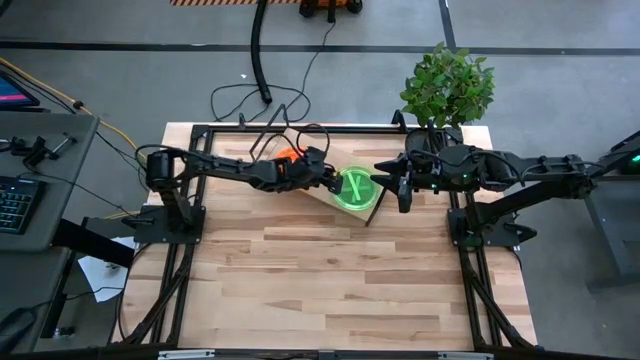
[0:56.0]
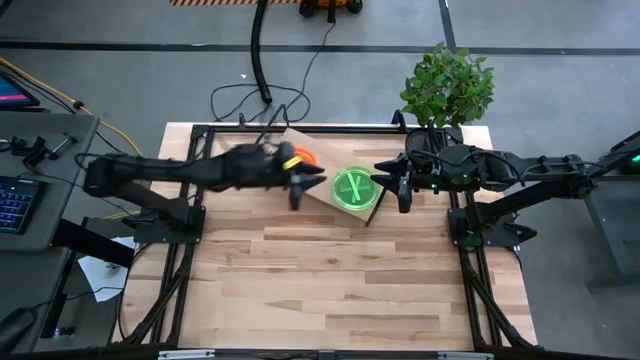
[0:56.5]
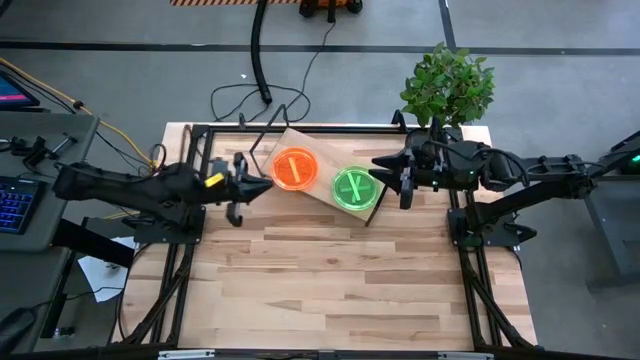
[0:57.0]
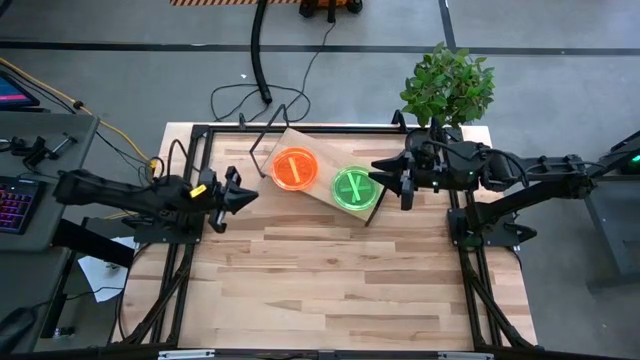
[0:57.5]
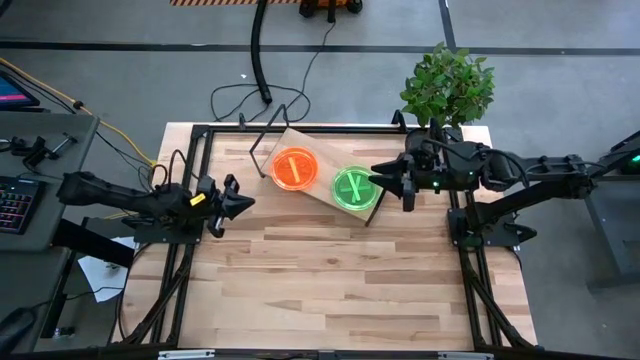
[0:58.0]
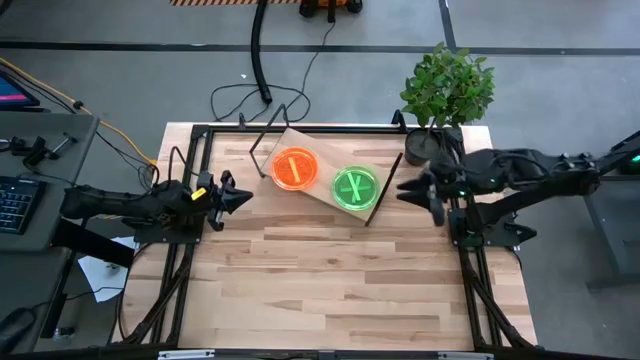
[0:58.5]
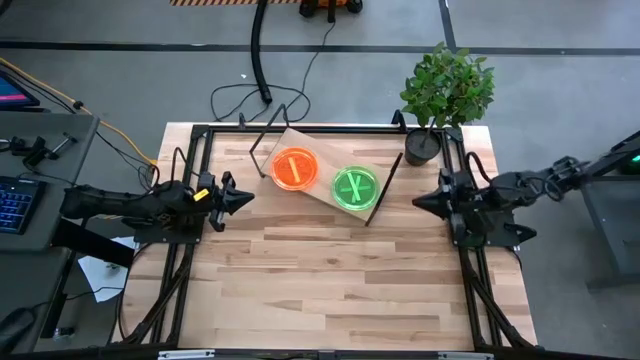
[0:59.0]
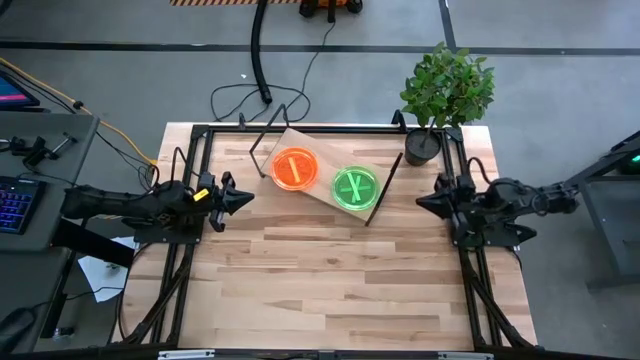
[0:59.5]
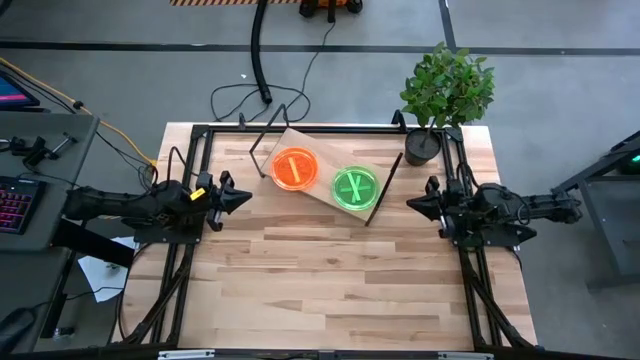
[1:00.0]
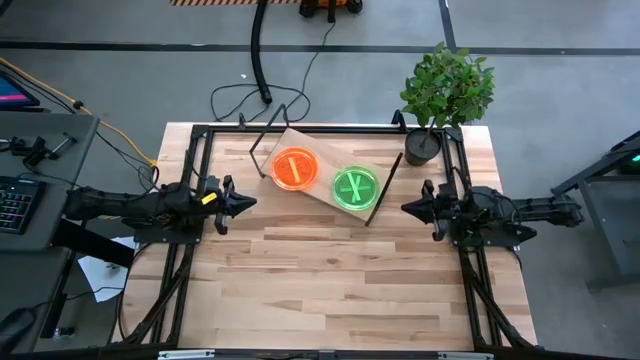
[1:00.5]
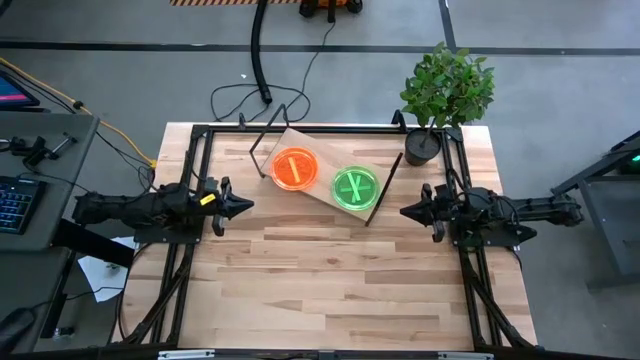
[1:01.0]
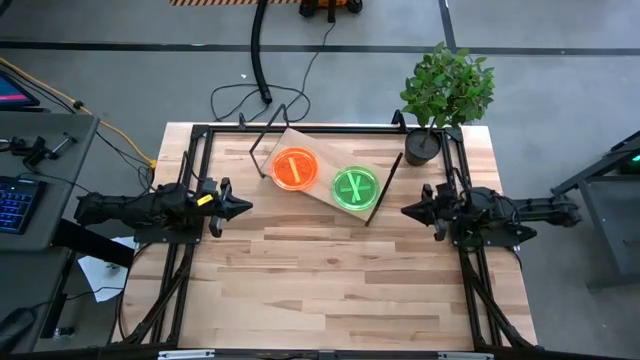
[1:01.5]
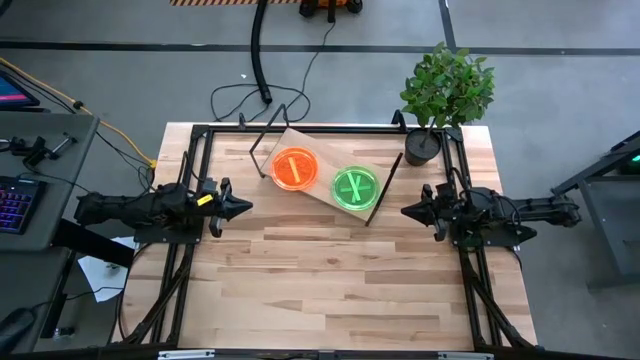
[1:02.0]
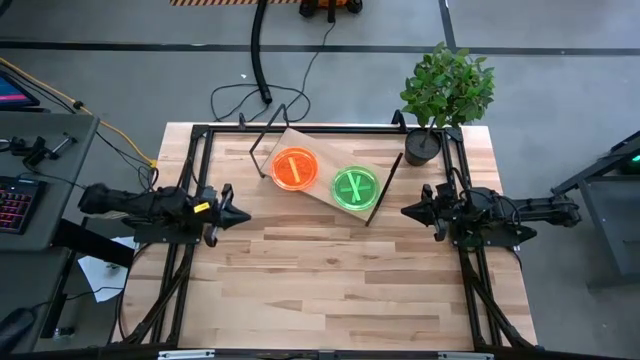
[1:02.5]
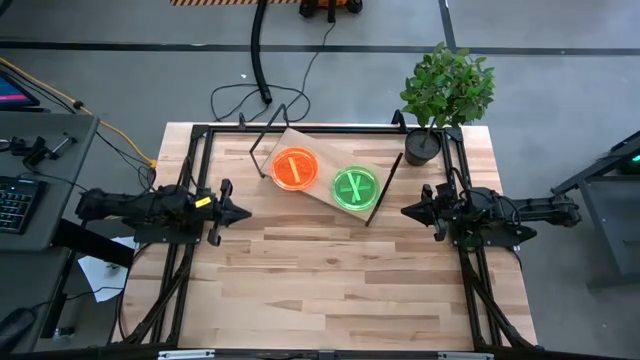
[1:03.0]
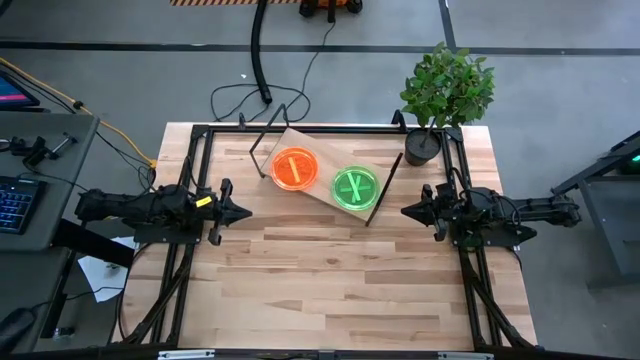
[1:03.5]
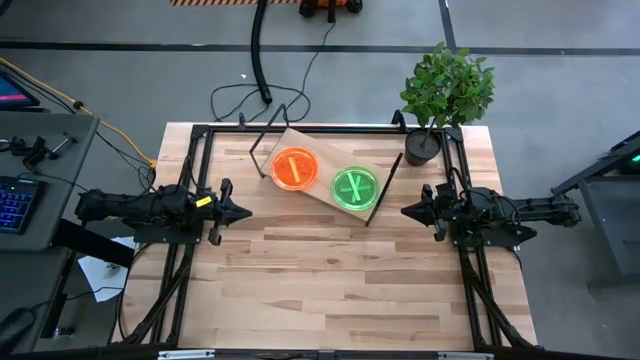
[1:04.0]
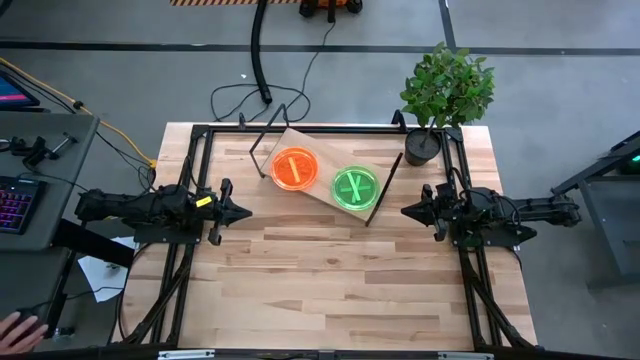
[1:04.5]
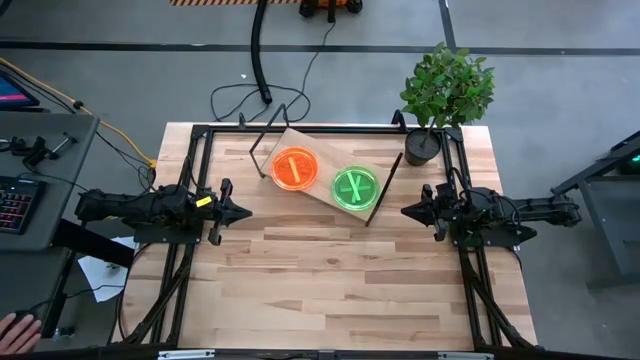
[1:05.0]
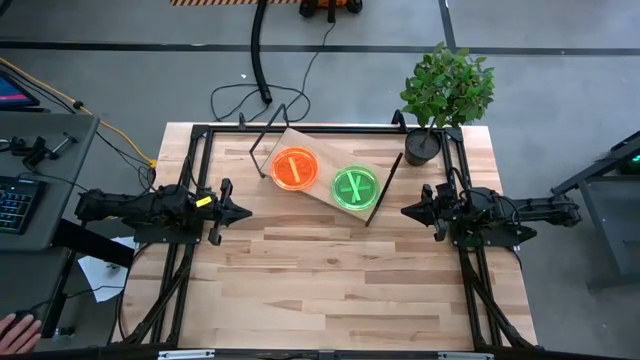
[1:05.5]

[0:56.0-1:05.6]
Task: Place and stack plates onto a shelf
Return to Home Position

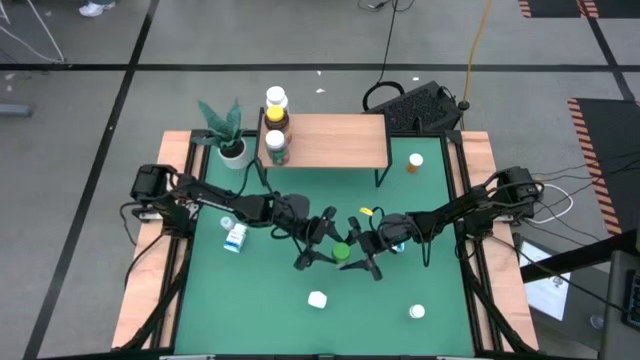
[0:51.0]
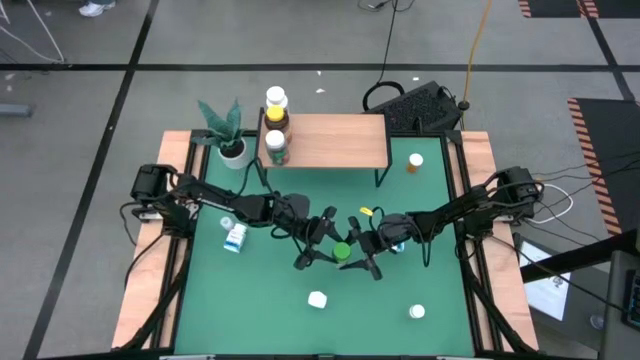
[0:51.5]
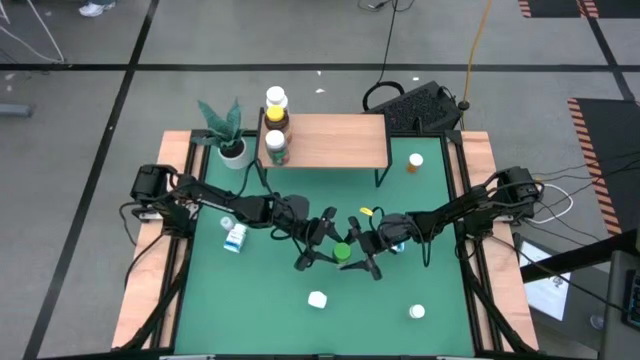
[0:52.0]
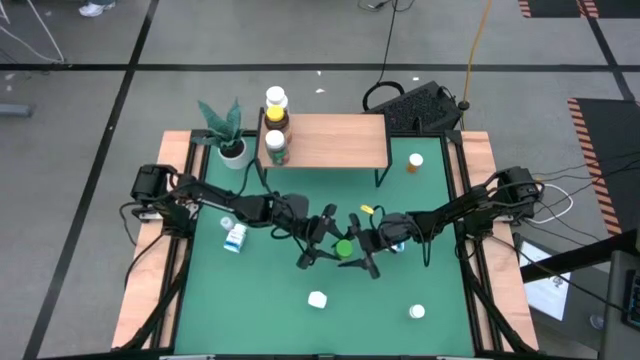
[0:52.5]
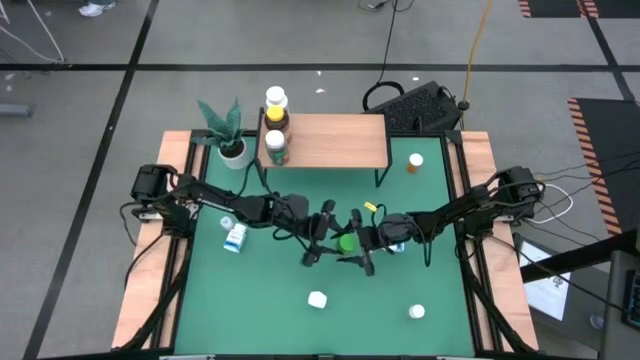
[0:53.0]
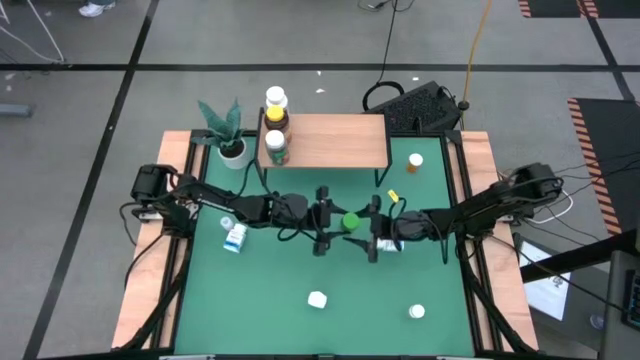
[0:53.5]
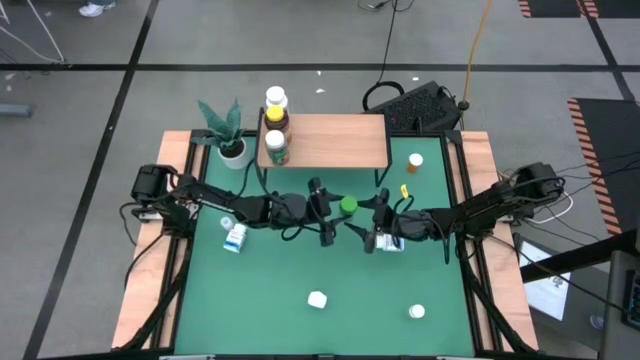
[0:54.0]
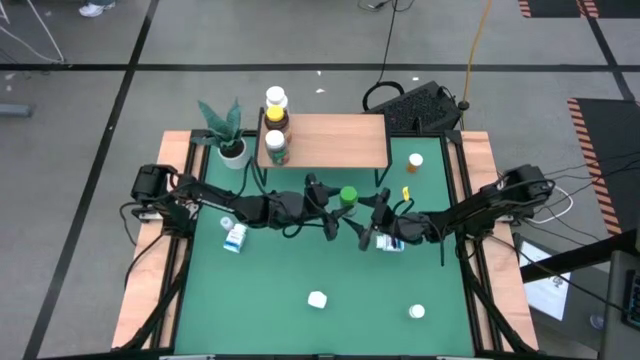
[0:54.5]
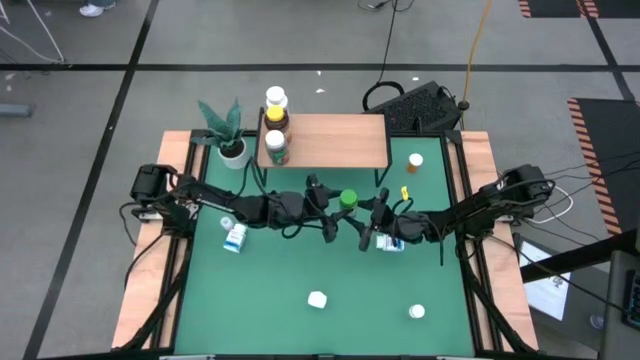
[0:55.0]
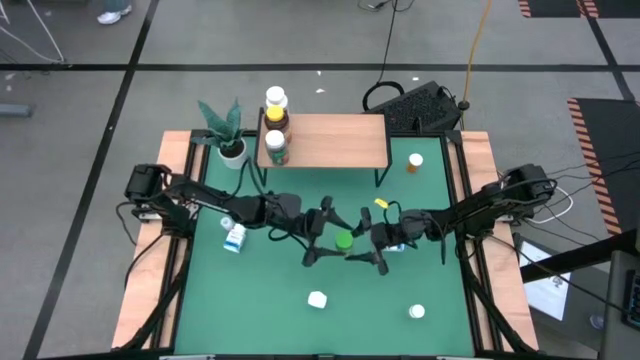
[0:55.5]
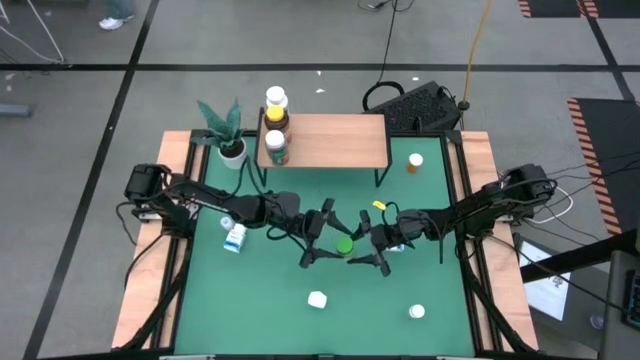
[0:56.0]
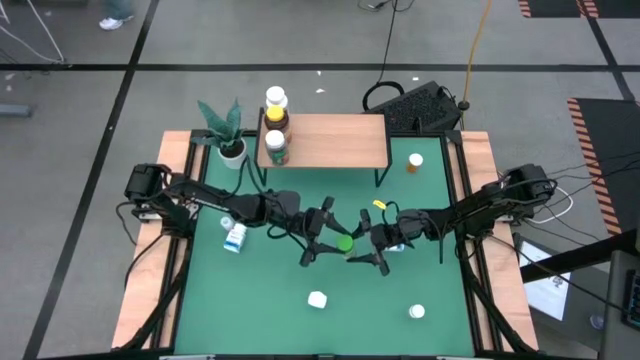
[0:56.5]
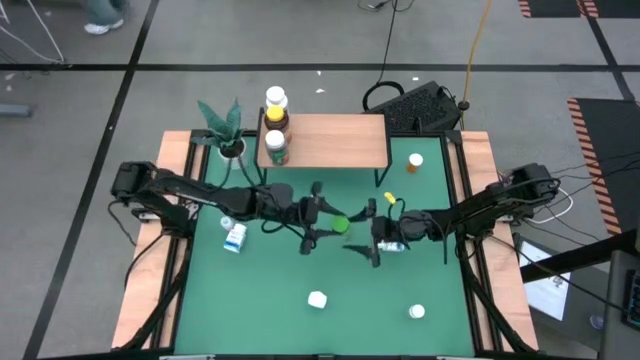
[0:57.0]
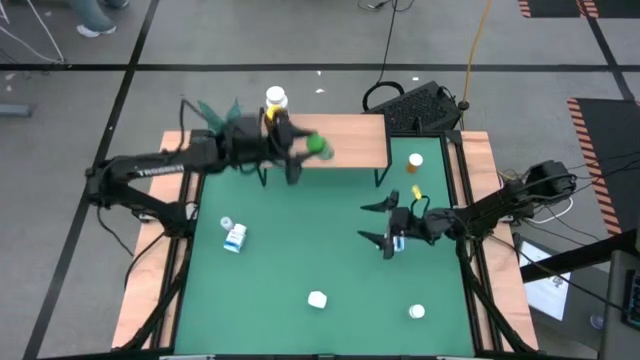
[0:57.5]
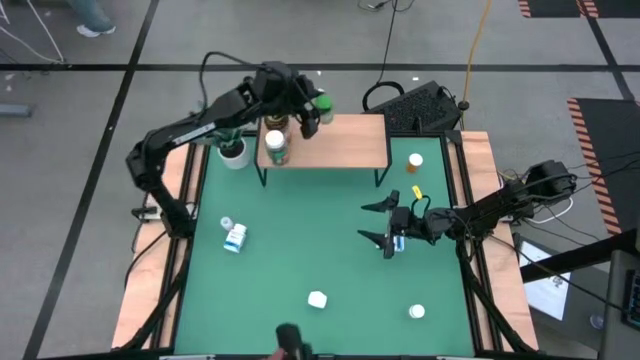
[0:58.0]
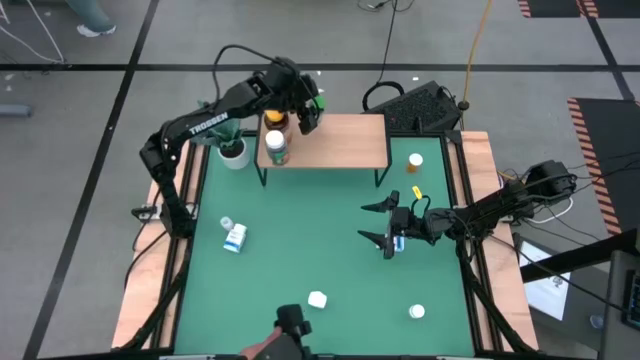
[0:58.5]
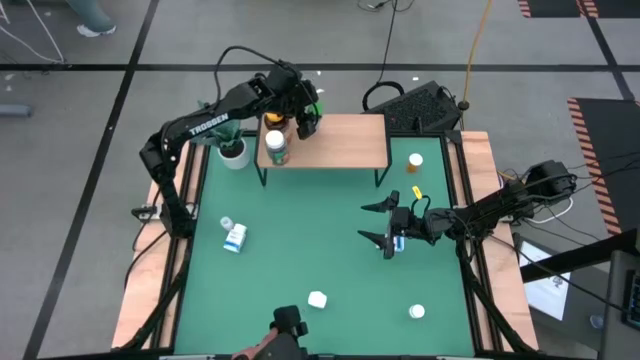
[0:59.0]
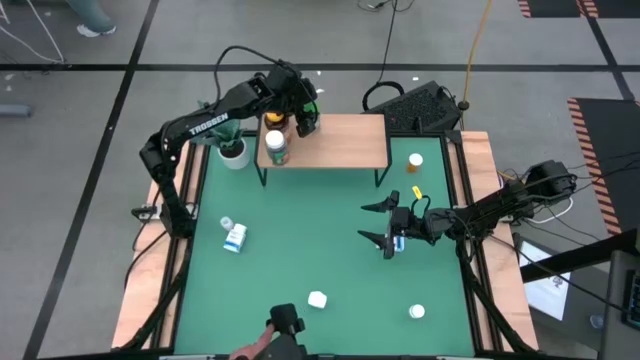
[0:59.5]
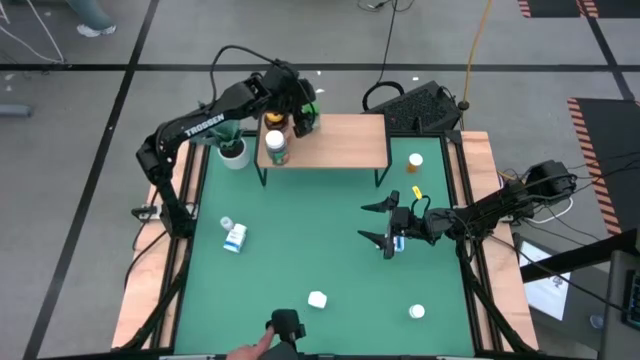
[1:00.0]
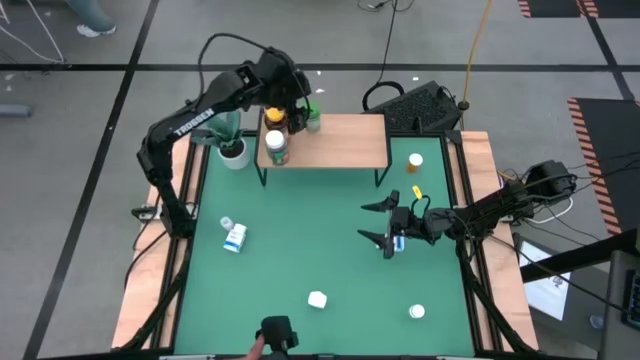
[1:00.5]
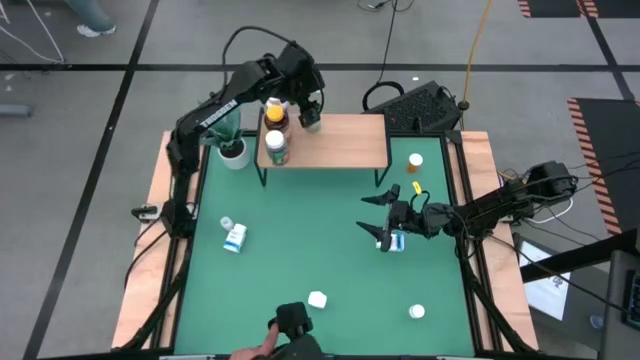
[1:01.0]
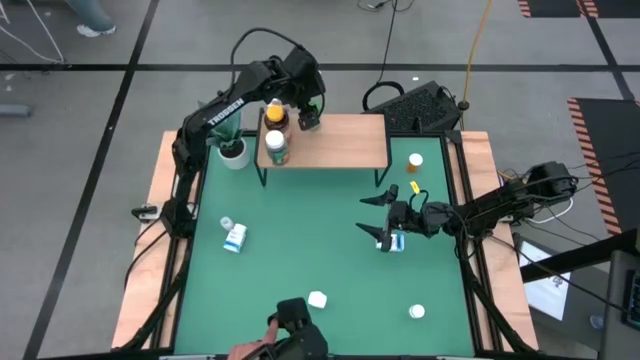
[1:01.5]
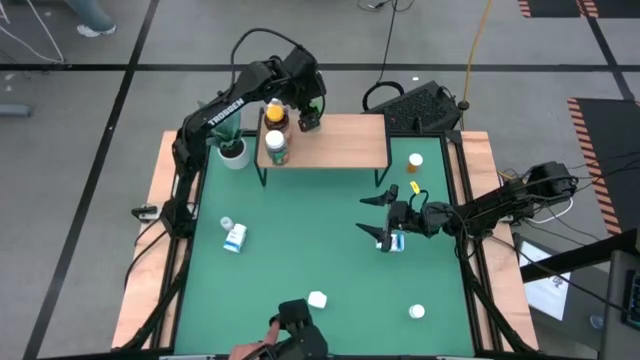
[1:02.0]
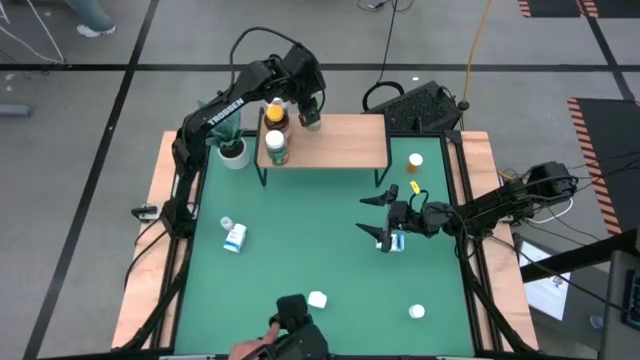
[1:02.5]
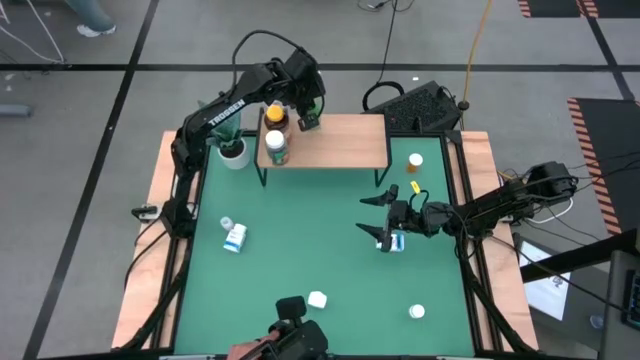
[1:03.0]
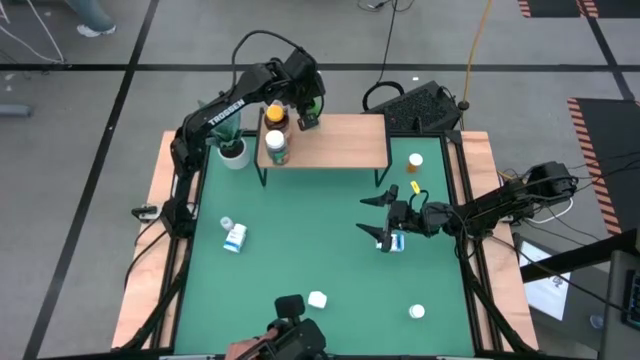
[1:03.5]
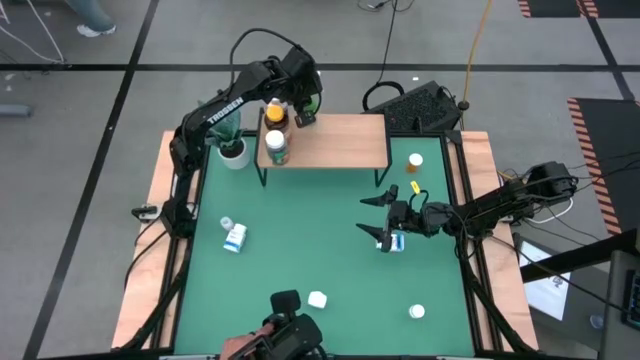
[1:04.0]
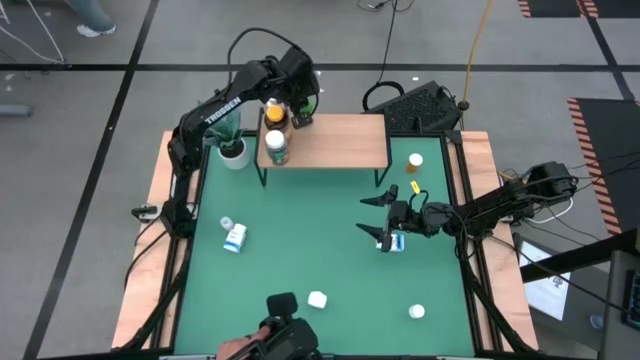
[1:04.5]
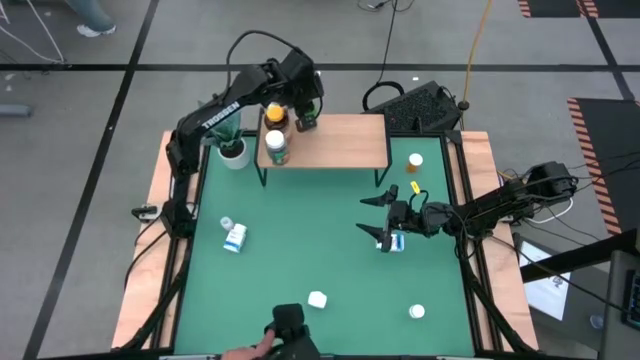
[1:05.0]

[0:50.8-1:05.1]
Task: Pick and place medicine bottles onto shelf by color
Put the green pill bottle on the shelf
